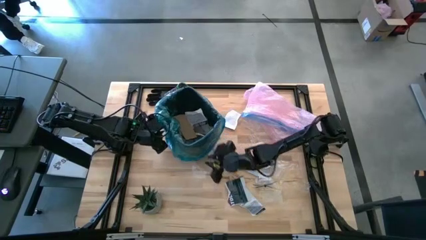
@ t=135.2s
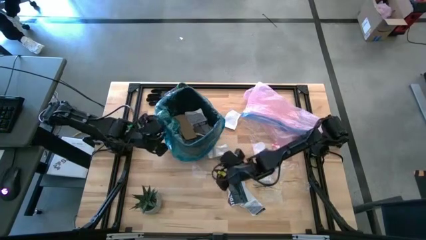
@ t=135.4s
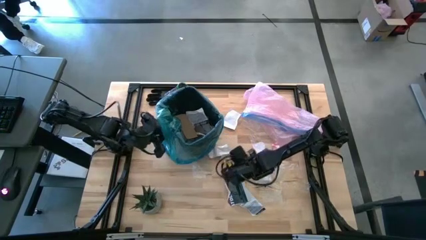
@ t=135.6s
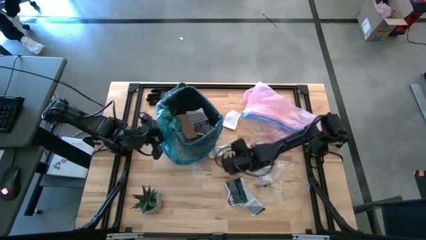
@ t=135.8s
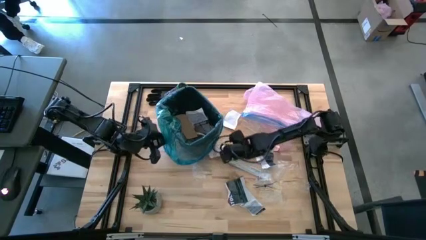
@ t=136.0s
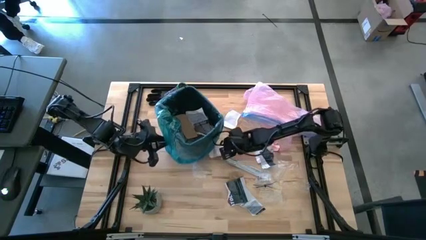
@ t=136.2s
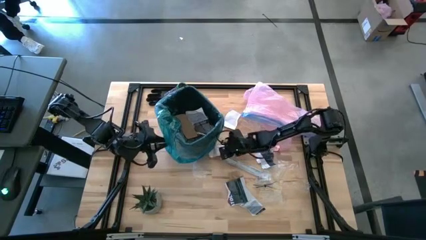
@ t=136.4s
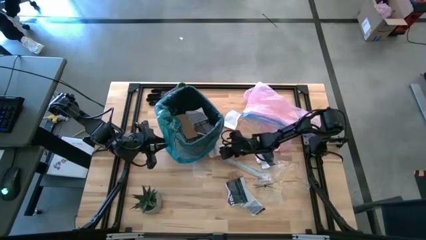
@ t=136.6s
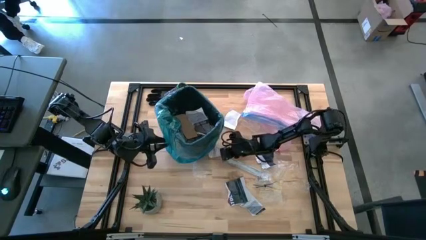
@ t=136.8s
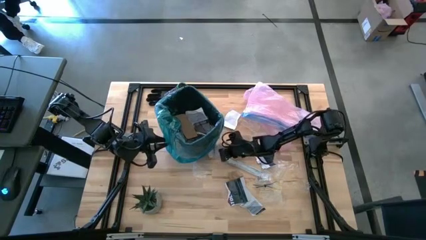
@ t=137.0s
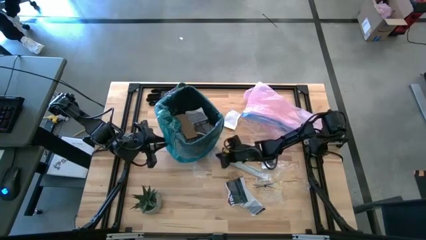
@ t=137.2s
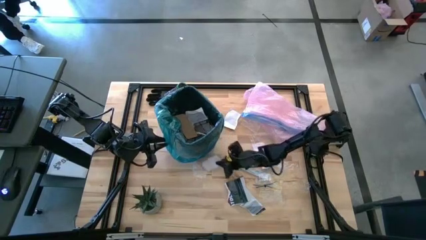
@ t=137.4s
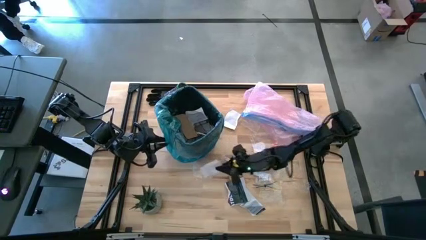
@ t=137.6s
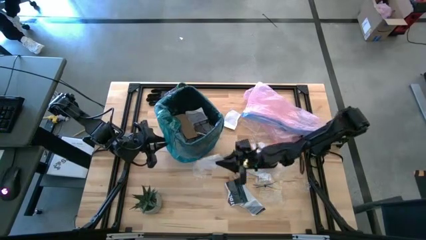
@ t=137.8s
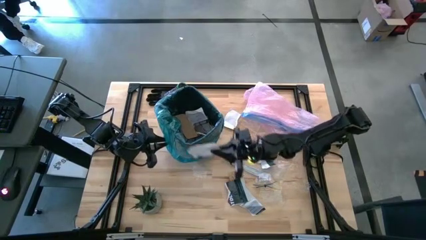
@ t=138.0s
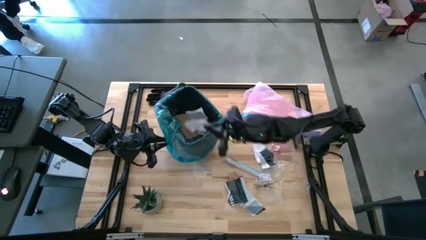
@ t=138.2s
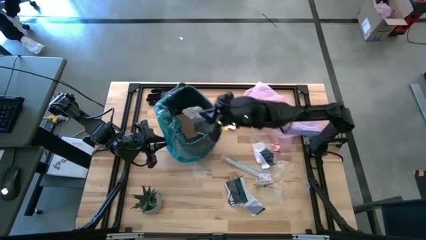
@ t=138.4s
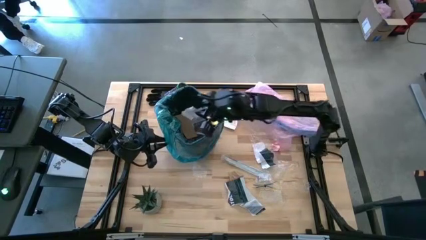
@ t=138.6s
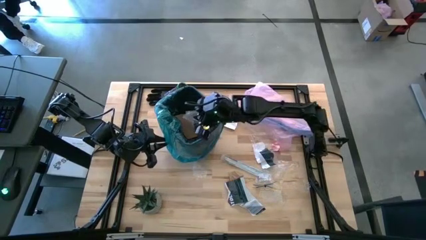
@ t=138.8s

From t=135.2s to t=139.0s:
Task: place trash/remove bag and relplace
Put the printed paper into the trash bin

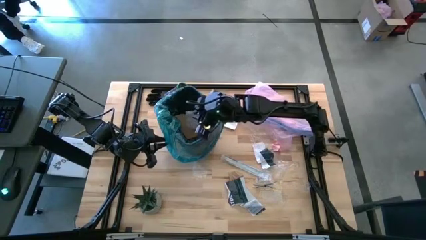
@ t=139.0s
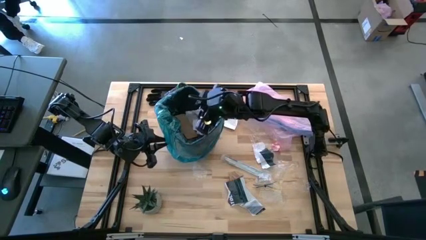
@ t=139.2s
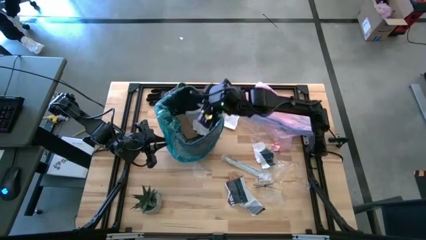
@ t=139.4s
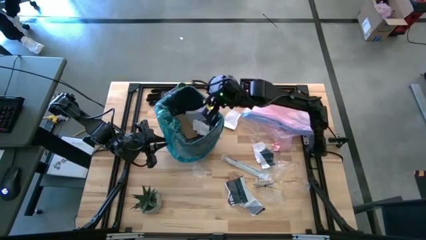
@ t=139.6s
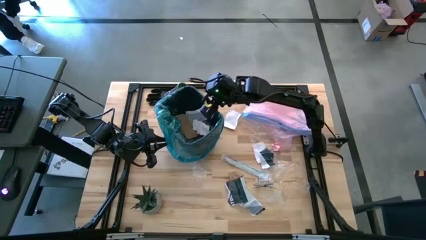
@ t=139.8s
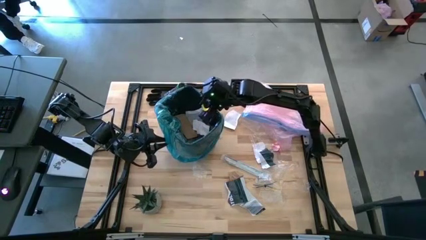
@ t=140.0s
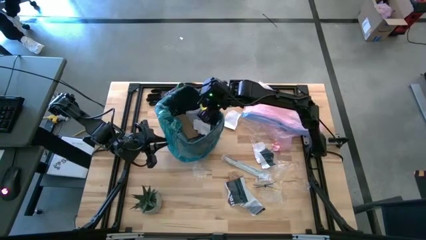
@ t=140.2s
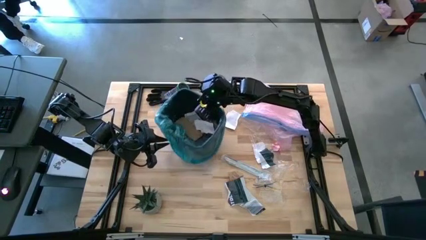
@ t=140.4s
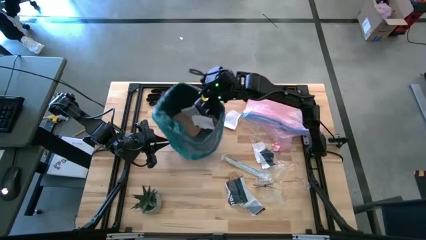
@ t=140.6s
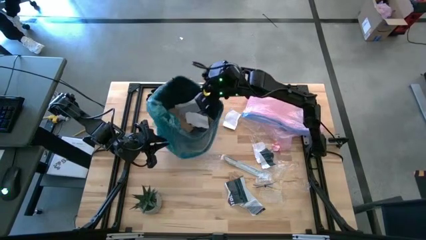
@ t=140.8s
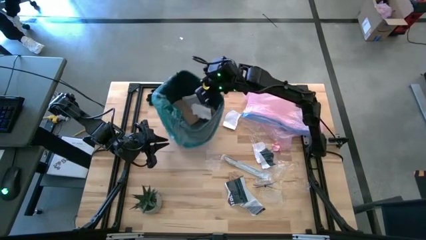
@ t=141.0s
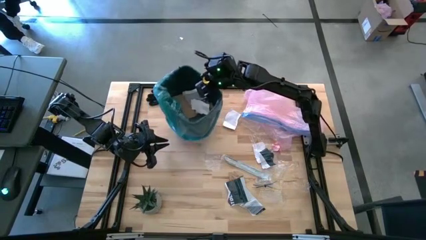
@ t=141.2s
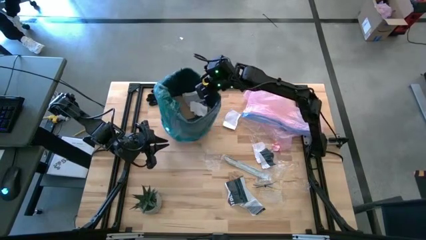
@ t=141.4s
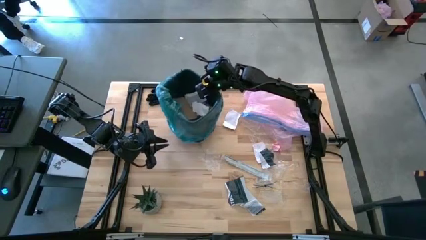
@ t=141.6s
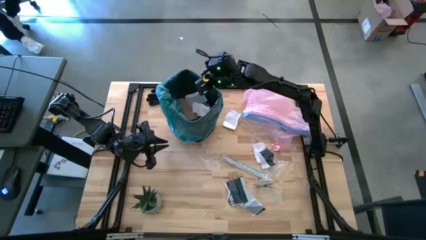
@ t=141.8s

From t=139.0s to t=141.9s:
Adjust the trash bin

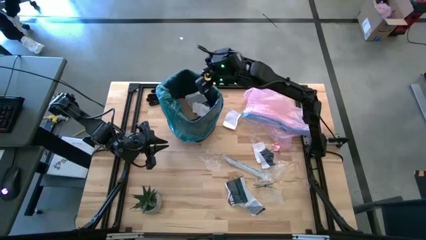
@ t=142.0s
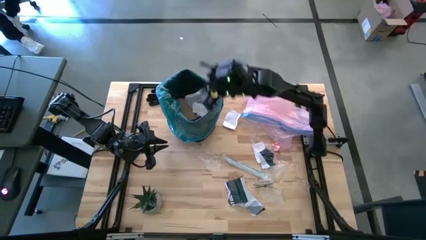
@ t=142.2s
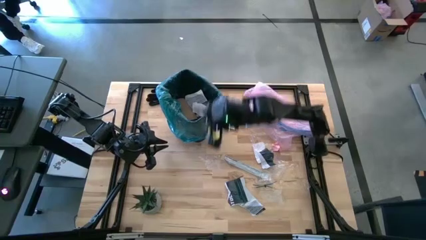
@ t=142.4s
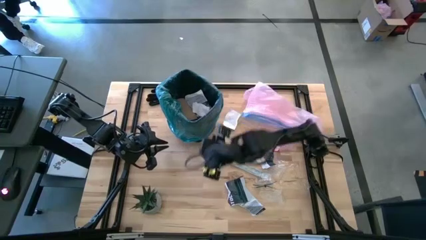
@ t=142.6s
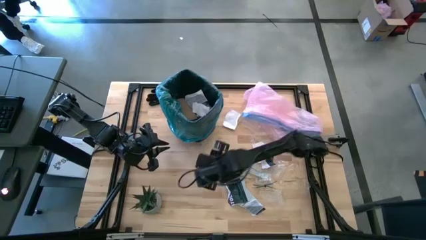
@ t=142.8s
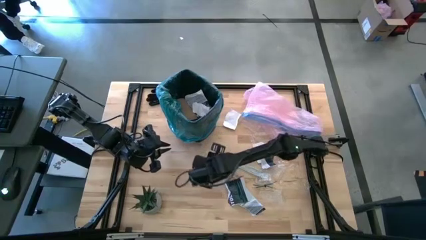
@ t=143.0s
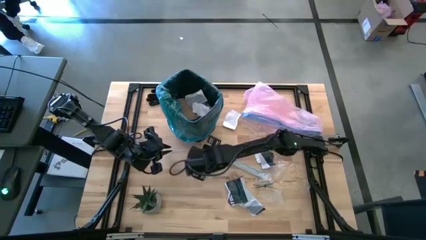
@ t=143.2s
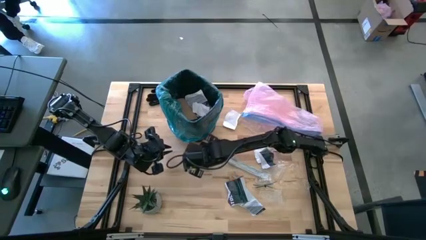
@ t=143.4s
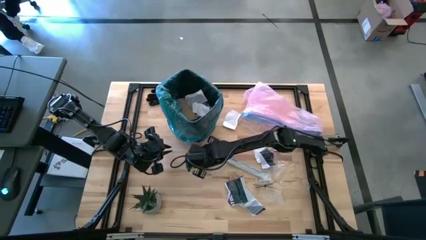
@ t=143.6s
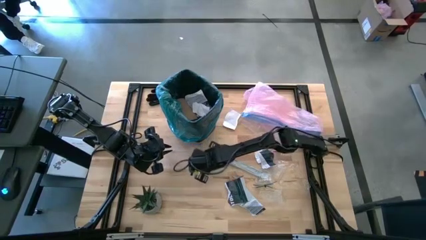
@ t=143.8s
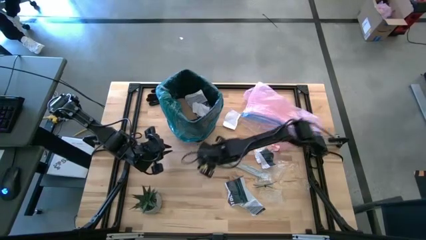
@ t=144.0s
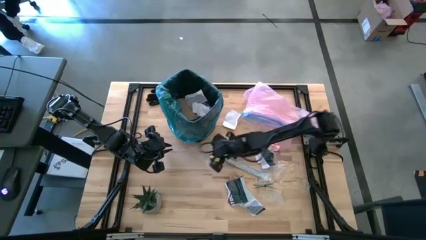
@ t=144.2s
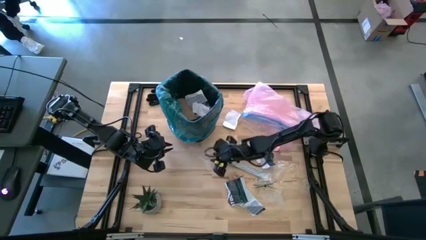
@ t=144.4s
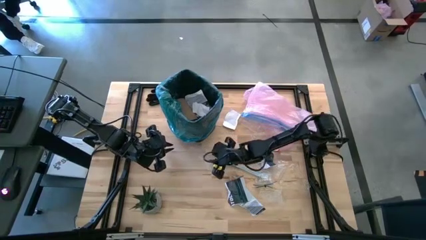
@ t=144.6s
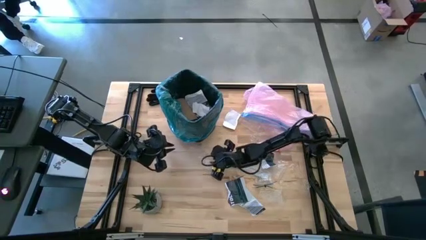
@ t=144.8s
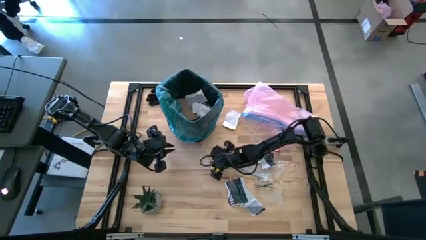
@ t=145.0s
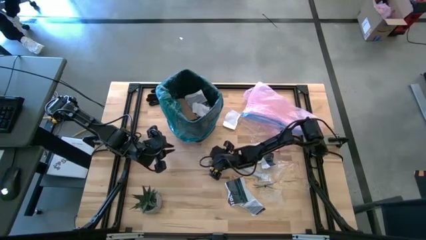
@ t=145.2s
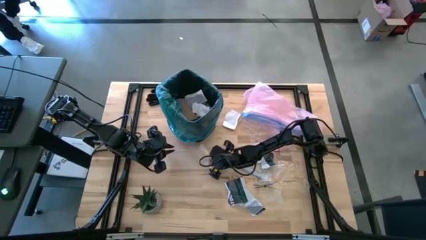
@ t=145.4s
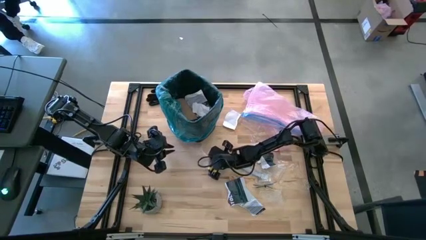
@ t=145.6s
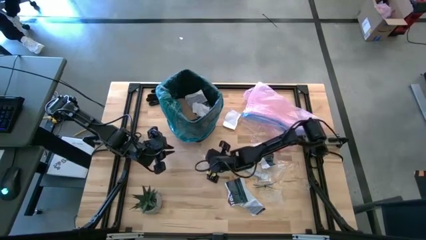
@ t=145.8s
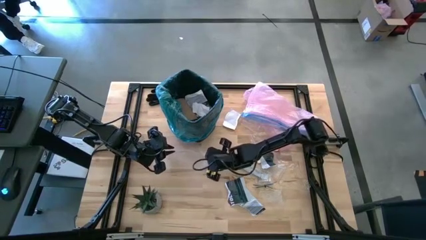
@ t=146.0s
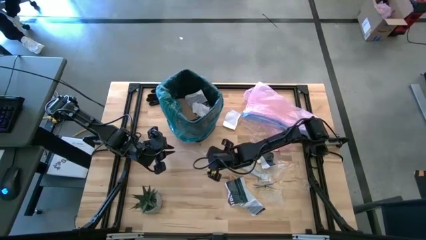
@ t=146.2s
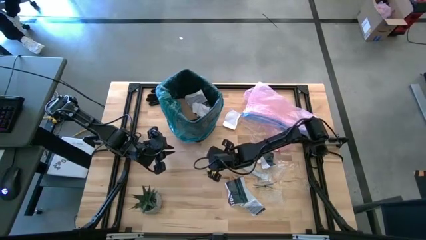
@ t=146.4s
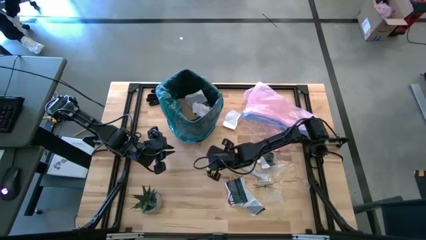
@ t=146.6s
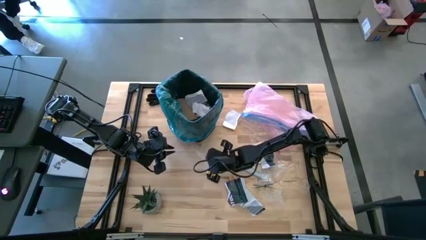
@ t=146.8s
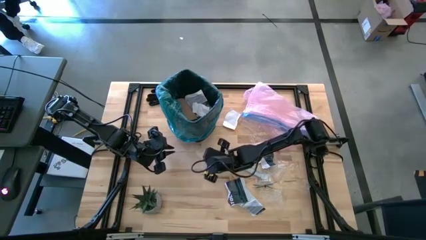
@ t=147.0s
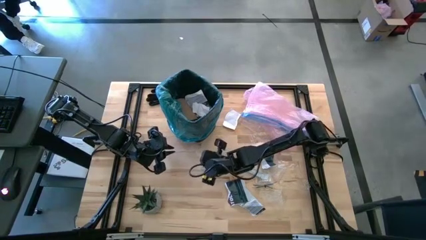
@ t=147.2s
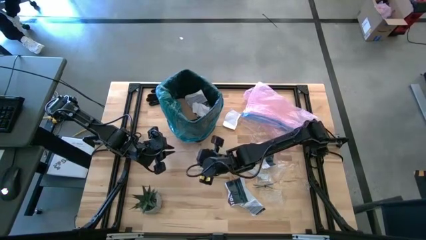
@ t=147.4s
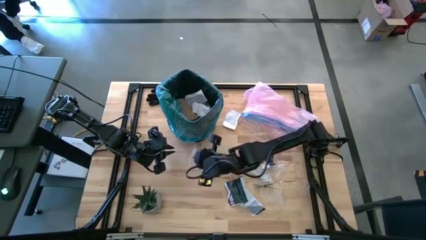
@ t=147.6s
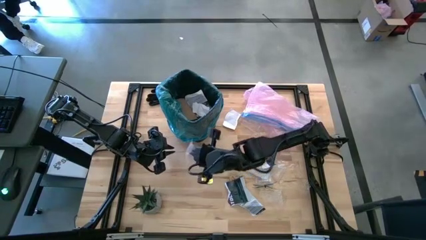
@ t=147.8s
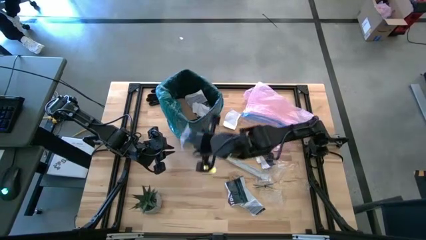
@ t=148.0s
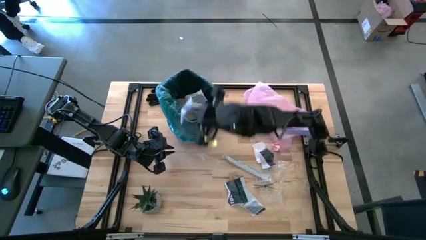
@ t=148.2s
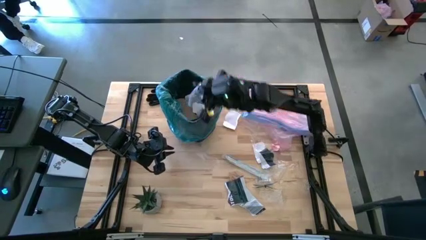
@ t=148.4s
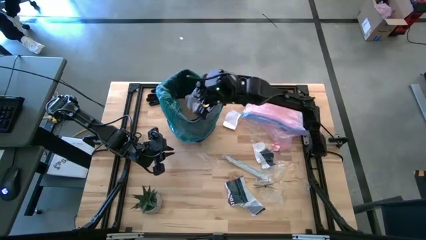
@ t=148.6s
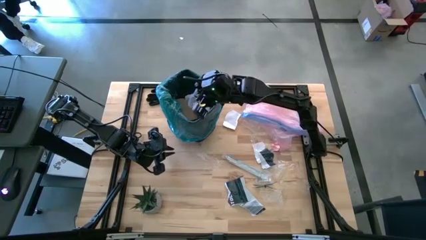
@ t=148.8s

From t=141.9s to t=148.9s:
Put the clear plastic into the trash bin

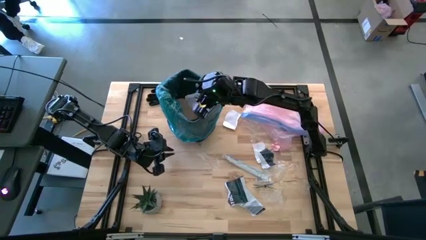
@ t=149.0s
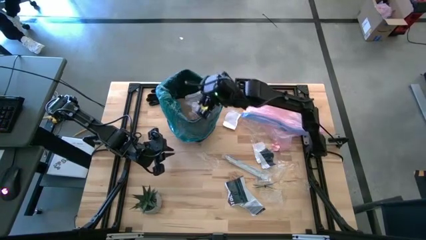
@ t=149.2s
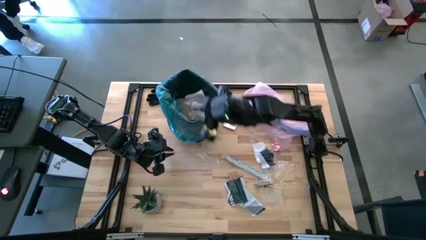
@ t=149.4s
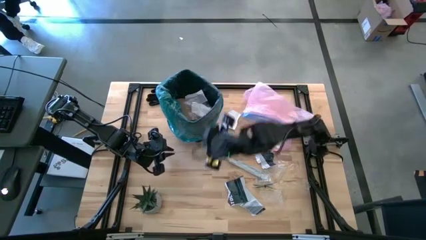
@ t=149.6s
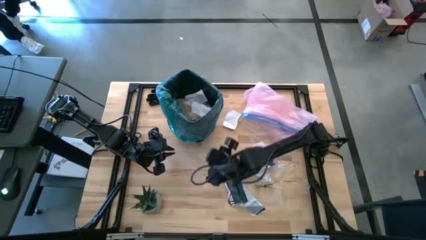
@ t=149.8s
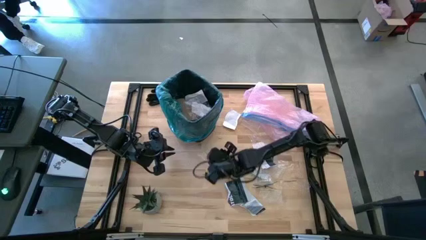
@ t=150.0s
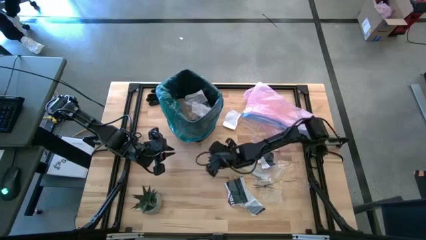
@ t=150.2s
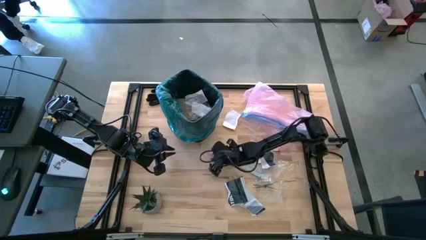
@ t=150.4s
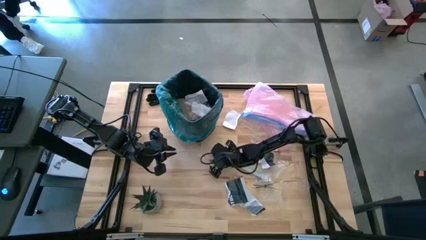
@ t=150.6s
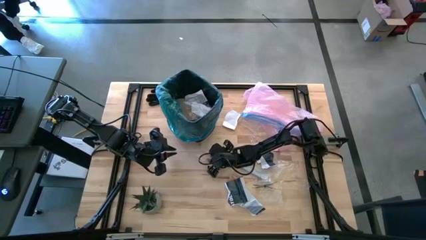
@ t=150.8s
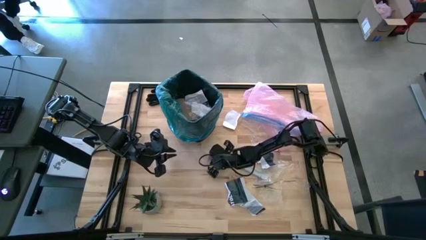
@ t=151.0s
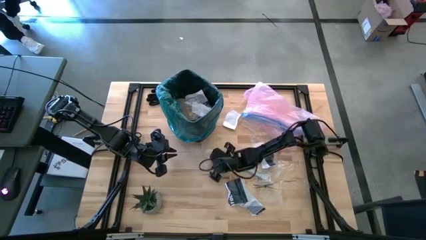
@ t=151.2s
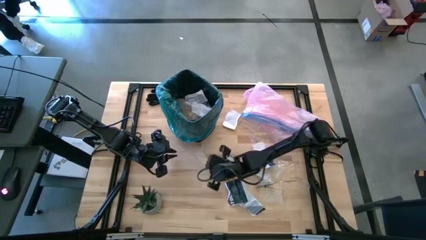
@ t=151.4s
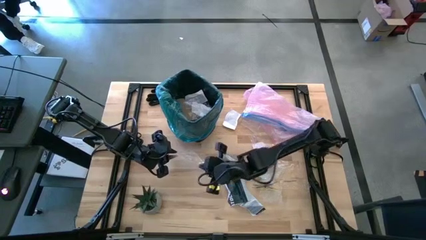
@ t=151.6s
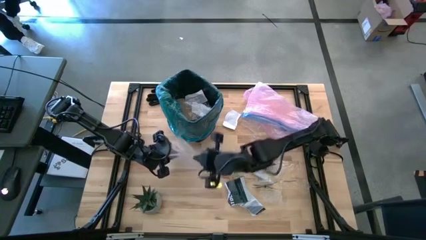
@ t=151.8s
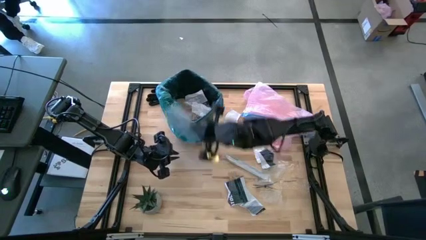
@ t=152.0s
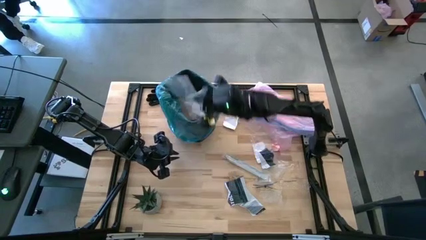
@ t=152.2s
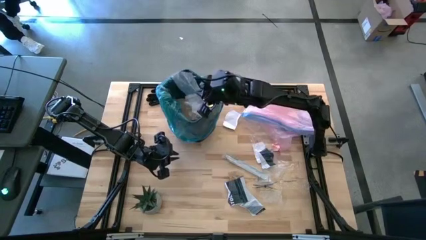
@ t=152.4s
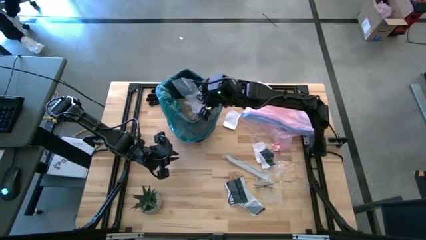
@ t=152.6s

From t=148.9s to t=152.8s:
Put the clear plastic into the trash bin
